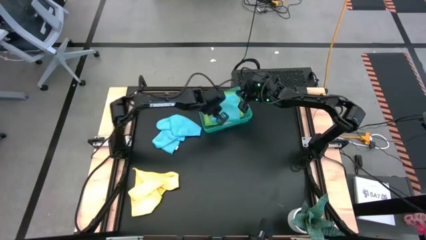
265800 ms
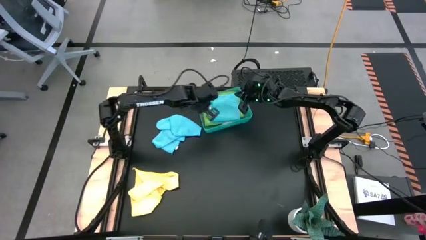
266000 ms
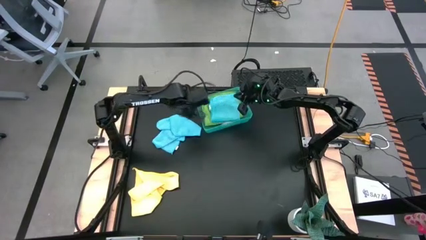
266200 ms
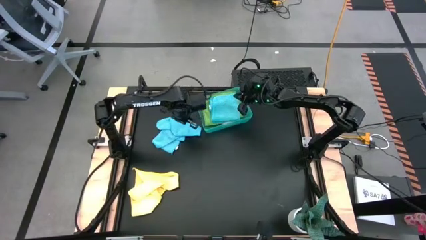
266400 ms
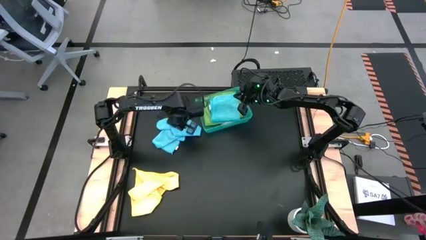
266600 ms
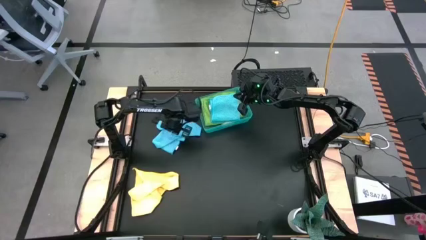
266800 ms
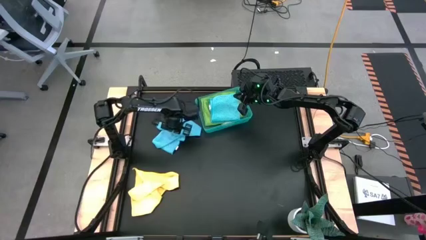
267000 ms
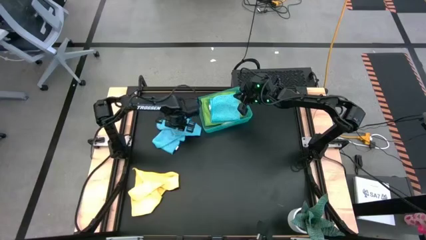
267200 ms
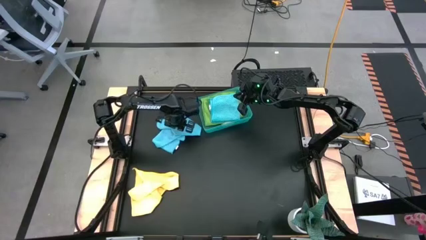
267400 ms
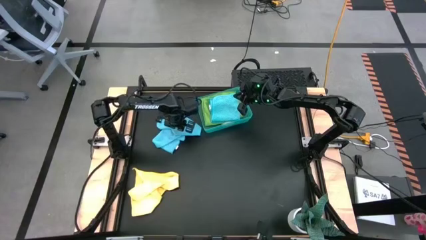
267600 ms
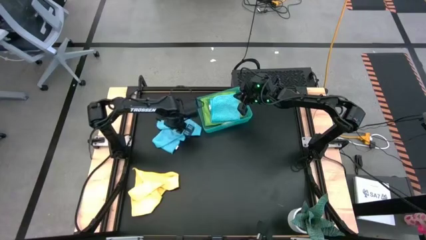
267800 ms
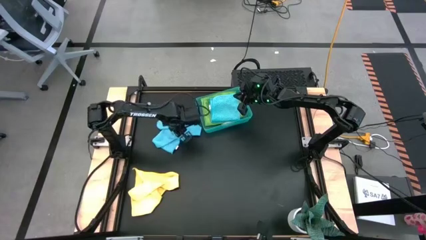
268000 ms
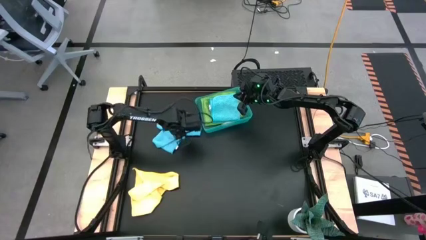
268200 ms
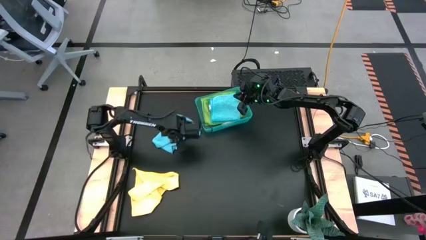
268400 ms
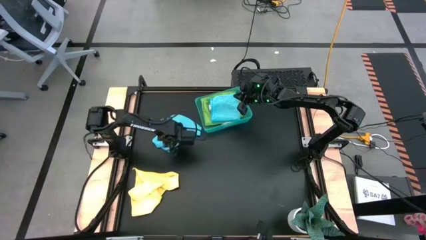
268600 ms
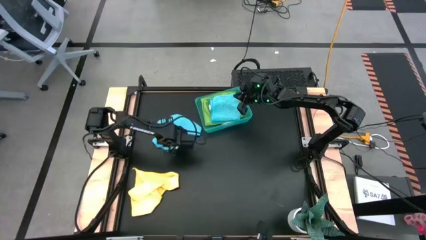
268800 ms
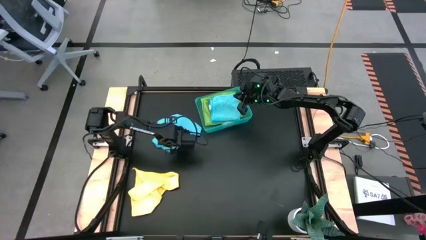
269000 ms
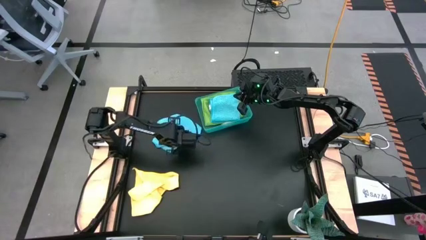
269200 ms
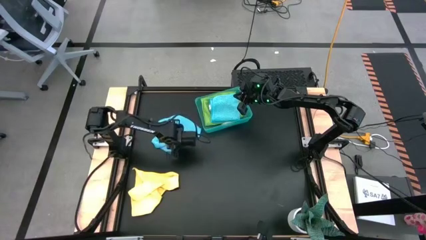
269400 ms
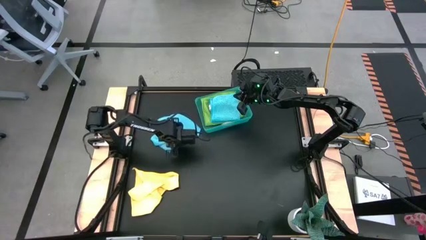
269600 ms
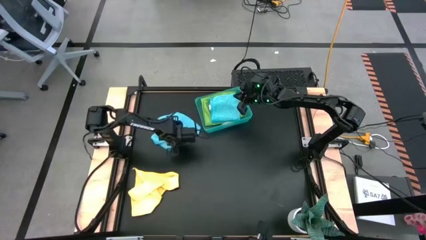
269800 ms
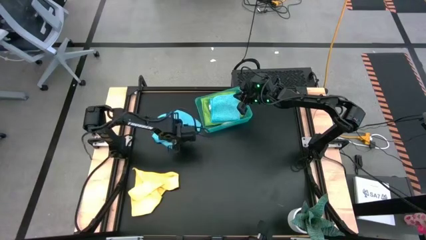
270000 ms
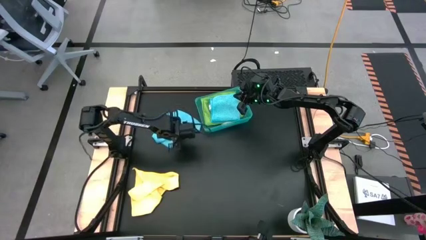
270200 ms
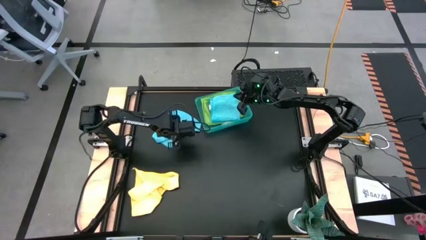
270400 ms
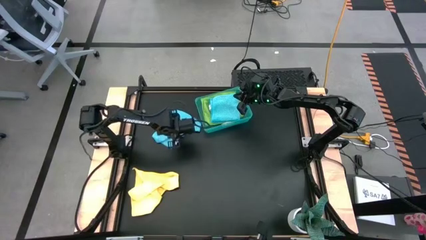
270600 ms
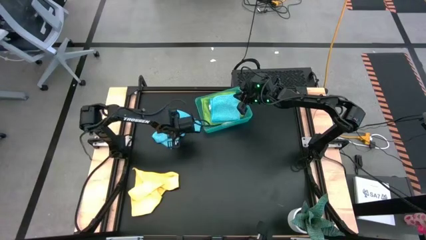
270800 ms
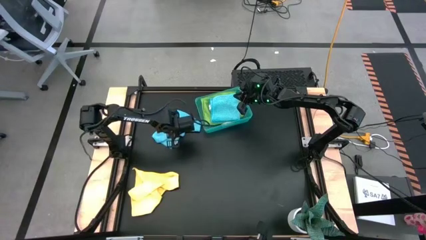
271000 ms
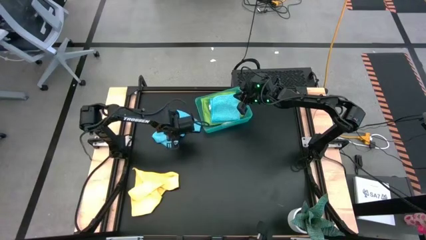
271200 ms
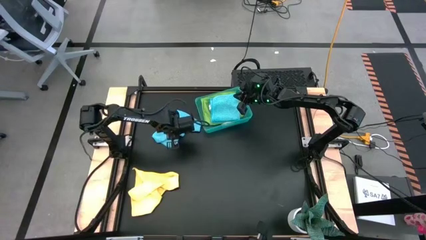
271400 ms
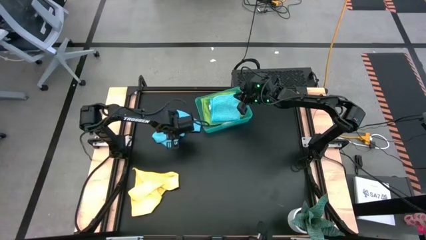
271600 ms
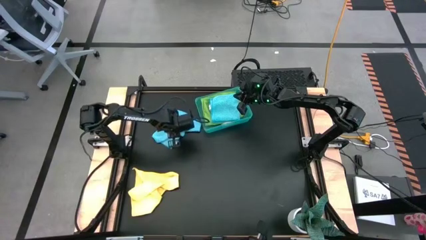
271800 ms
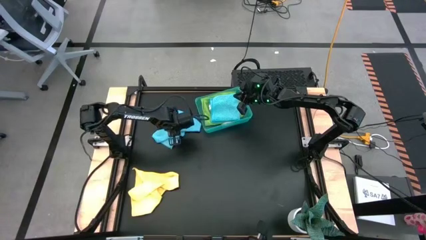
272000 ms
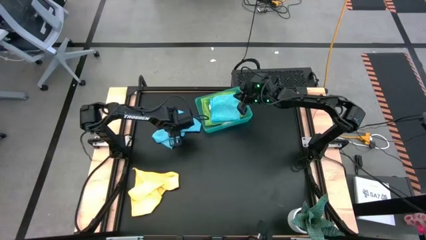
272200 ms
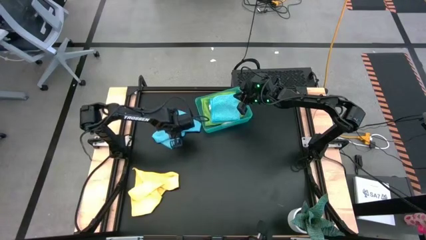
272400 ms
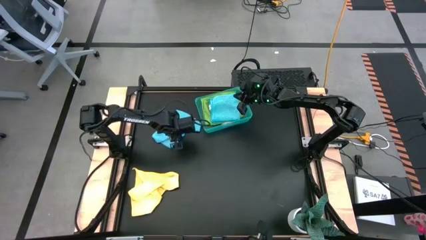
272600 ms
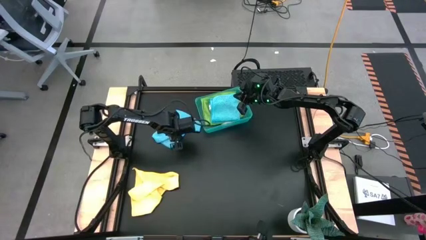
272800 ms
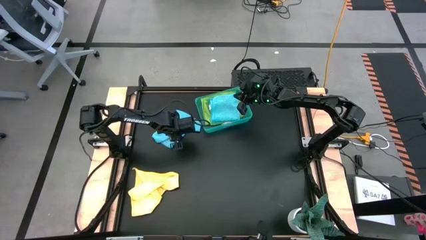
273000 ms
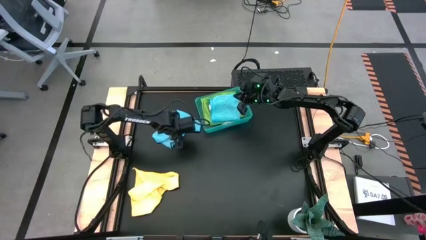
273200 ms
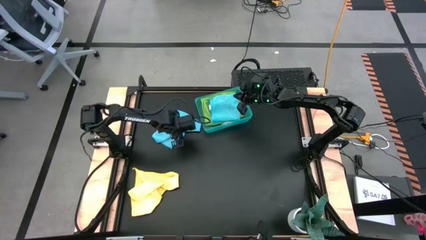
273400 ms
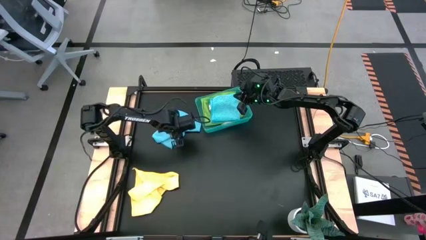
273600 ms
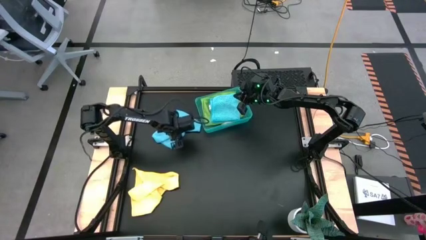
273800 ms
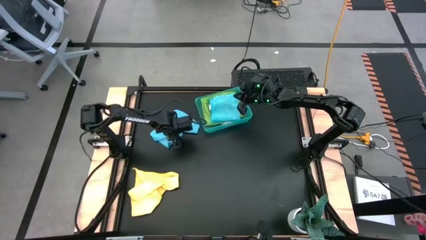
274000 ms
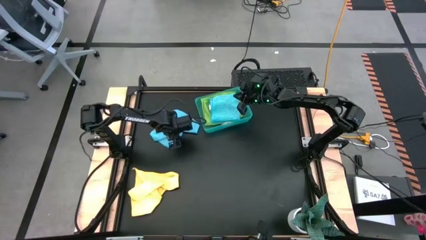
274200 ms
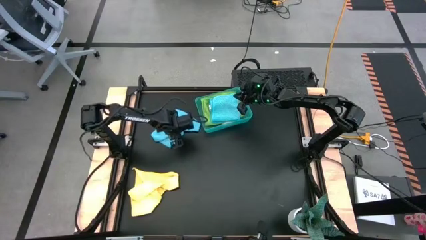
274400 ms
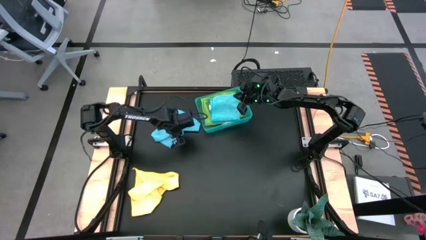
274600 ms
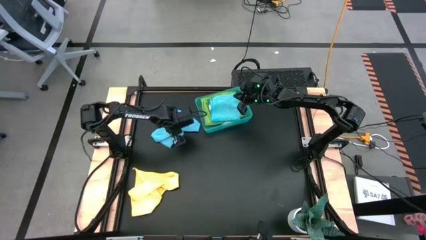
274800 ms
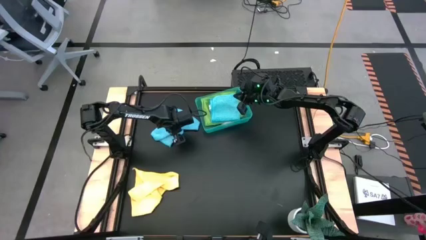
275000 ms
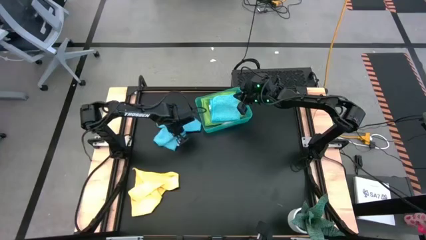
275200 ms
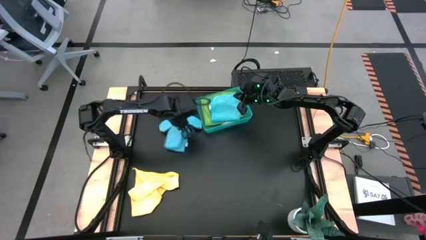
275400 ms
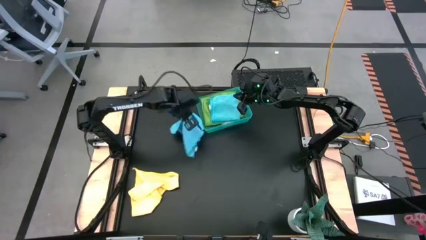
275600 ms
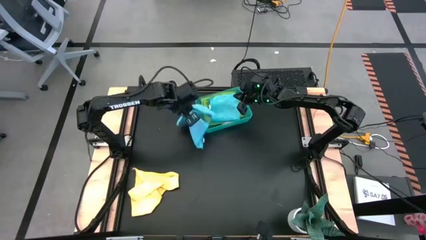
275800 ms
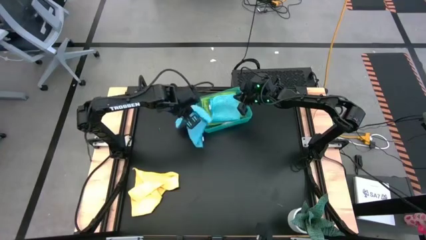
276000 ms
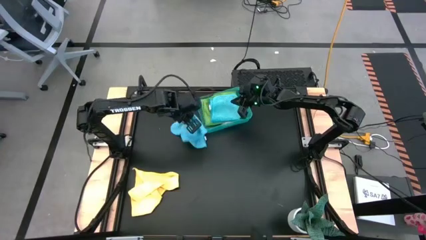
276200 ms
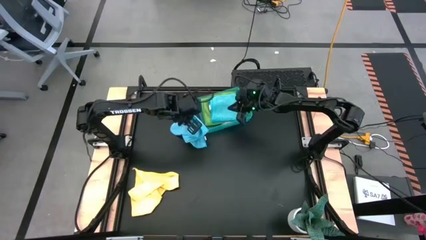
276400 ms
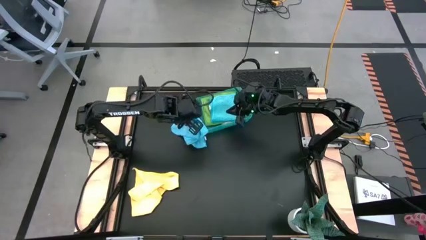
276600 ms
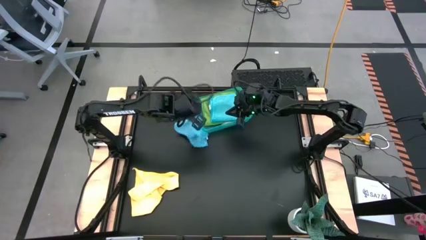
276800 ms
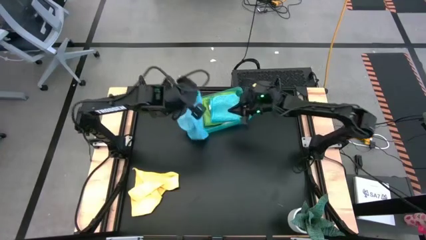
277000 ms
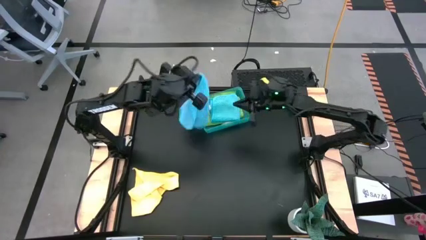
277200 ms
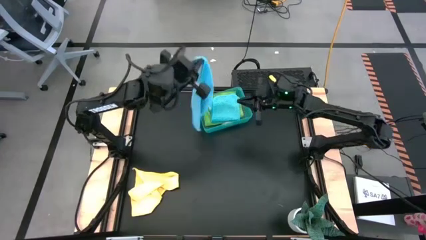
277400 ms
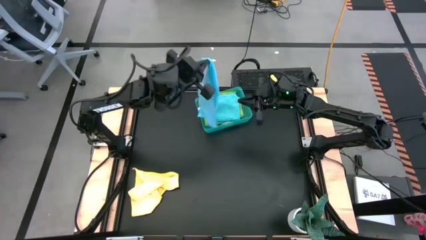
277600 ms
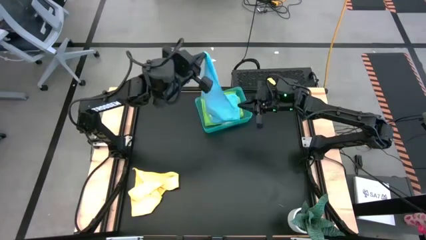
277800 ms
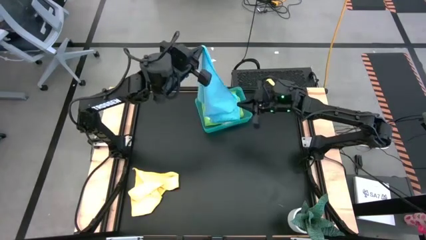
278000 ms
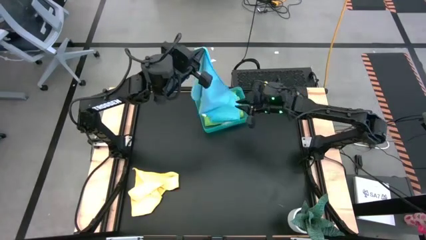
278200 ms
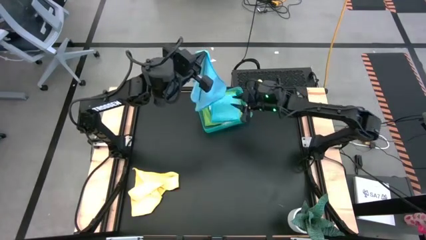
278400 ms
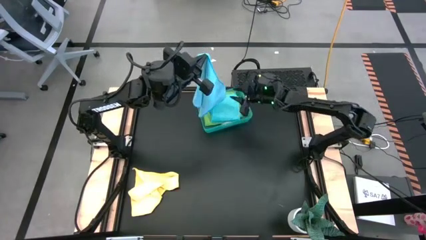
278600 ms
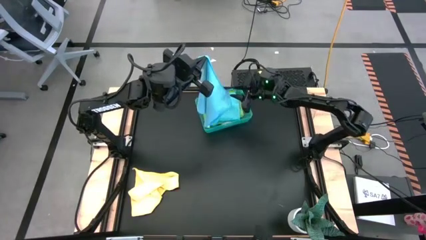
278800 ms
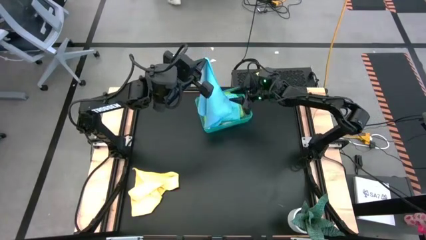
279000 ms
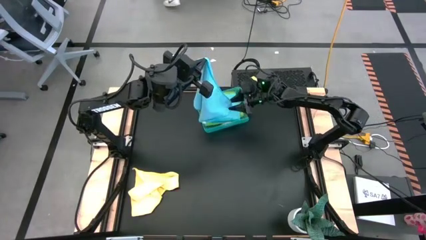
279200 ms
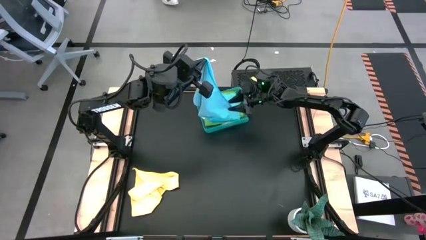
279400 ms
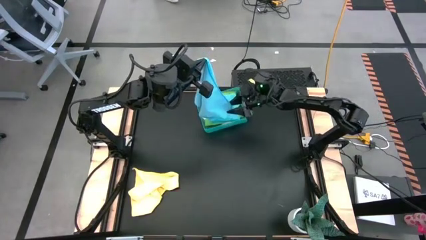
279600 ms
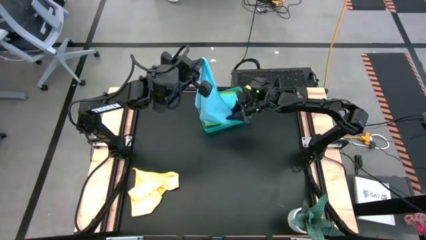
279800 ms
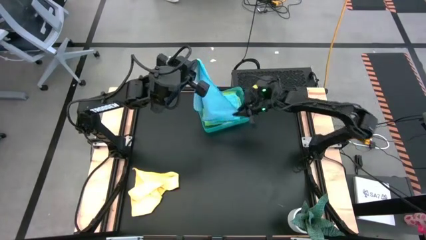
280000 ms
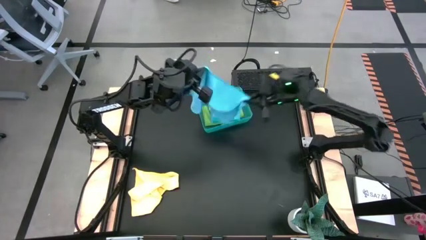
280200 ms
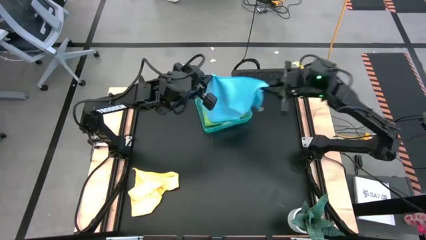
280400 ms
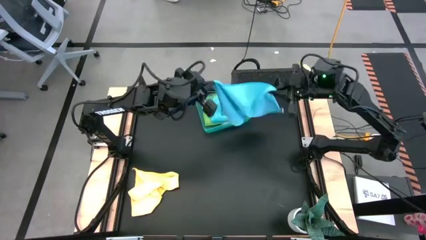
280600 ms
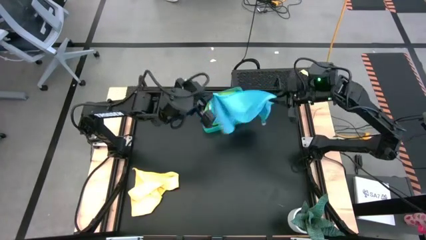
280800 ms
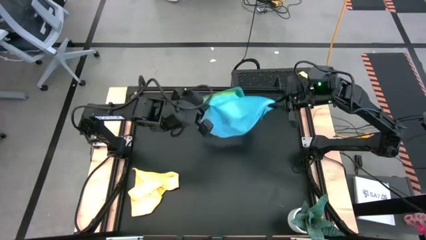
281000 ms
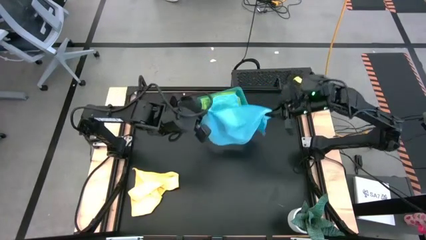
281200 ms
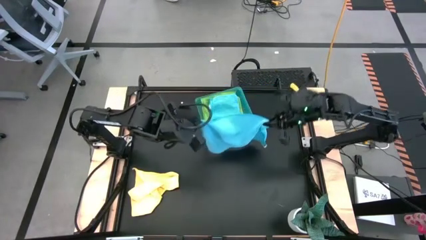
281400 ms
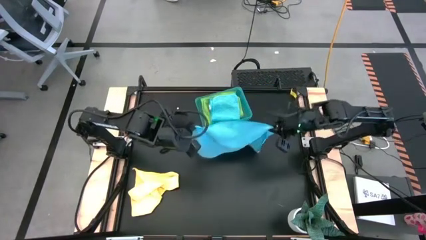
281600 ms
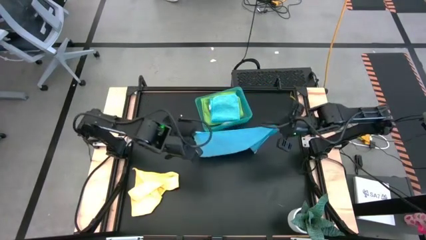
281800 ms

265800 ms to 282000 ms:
Task: Fold microfiber towels
Fold the blue microfiber towel
